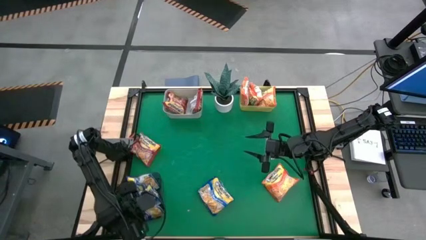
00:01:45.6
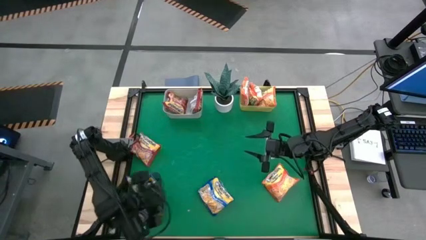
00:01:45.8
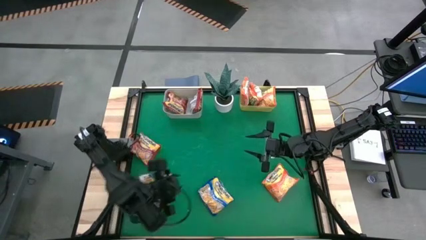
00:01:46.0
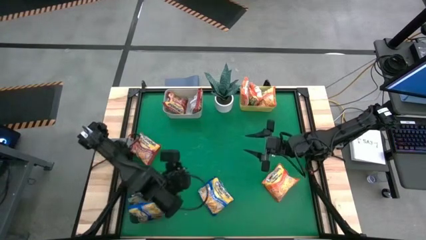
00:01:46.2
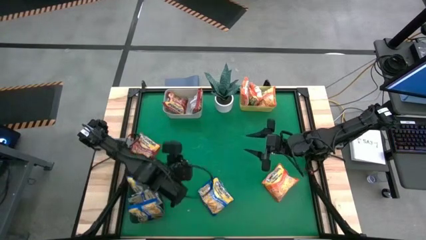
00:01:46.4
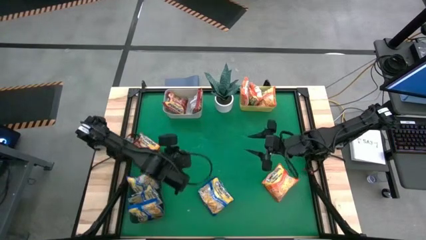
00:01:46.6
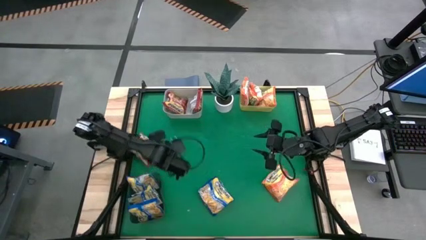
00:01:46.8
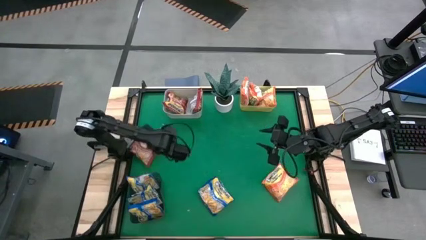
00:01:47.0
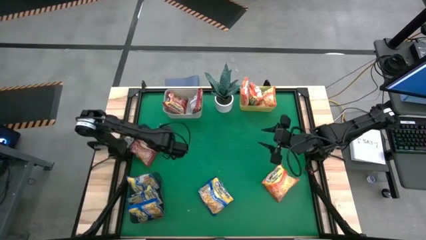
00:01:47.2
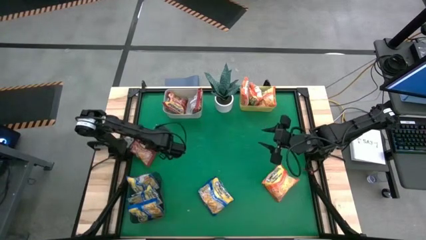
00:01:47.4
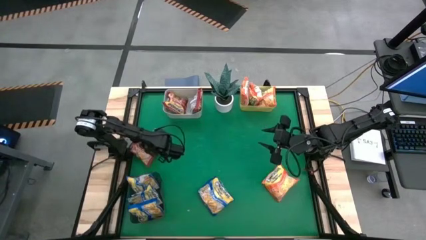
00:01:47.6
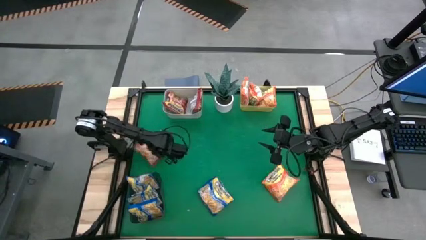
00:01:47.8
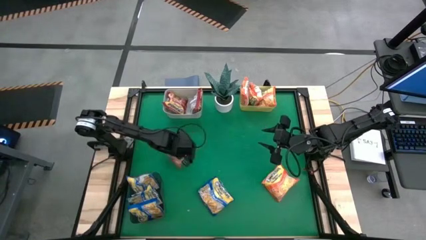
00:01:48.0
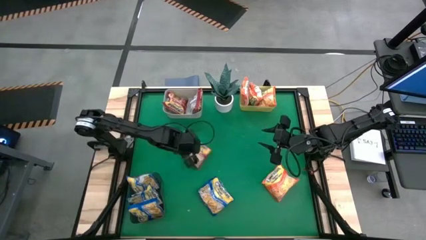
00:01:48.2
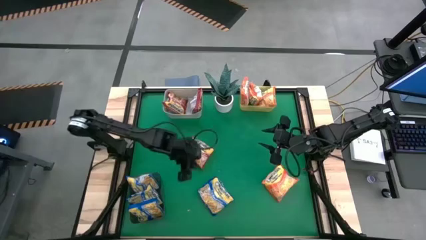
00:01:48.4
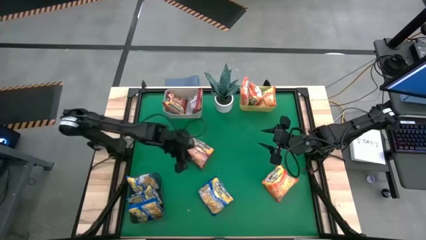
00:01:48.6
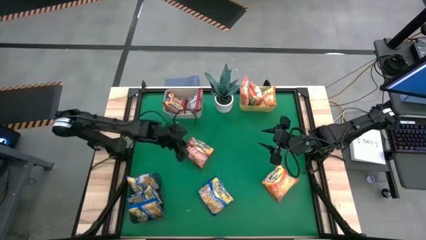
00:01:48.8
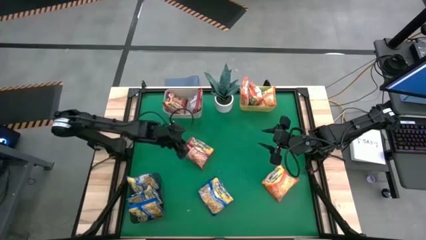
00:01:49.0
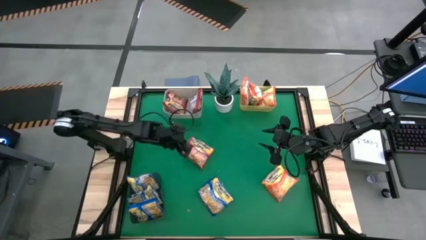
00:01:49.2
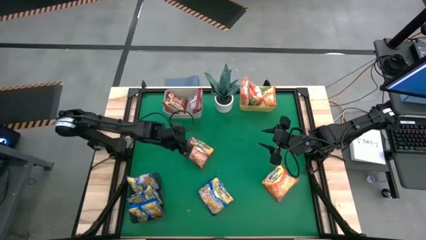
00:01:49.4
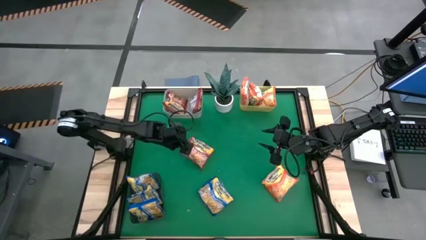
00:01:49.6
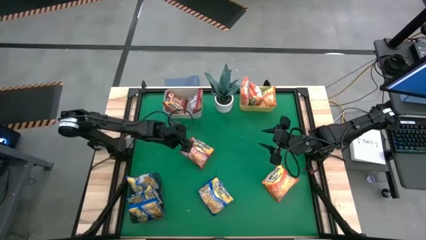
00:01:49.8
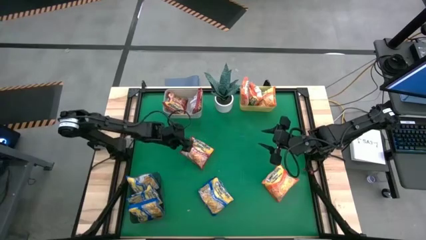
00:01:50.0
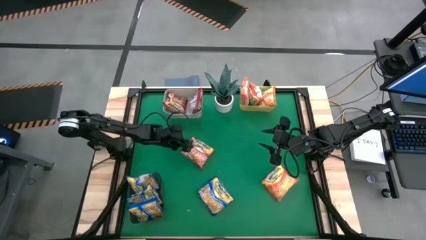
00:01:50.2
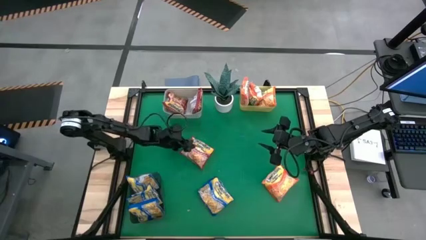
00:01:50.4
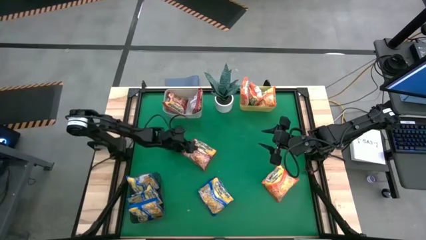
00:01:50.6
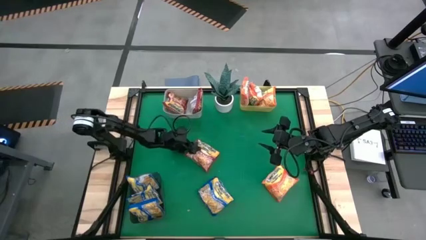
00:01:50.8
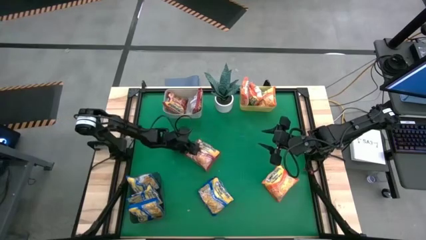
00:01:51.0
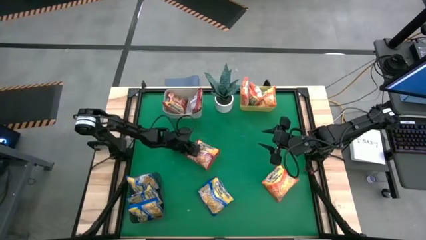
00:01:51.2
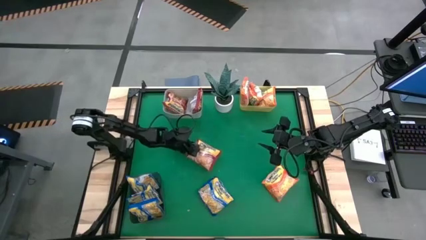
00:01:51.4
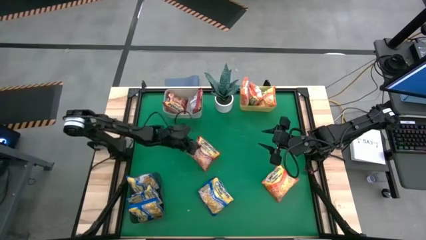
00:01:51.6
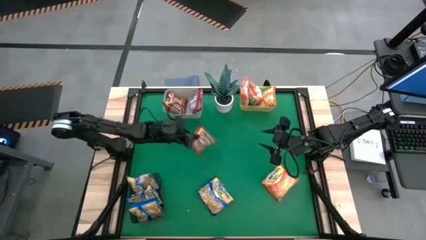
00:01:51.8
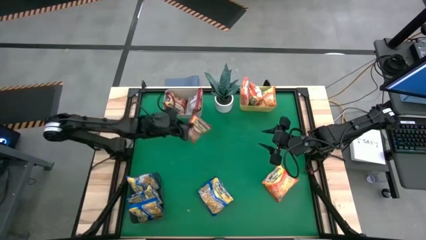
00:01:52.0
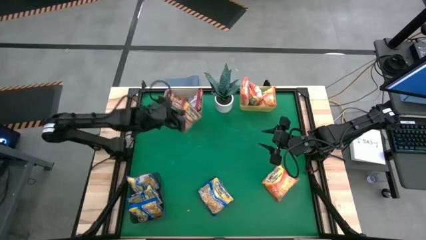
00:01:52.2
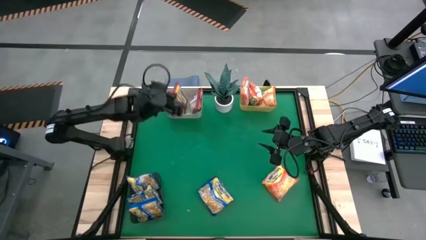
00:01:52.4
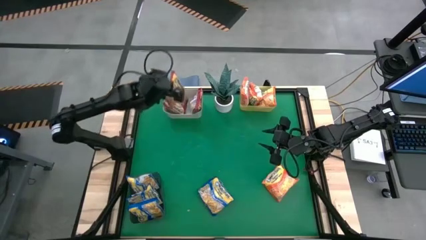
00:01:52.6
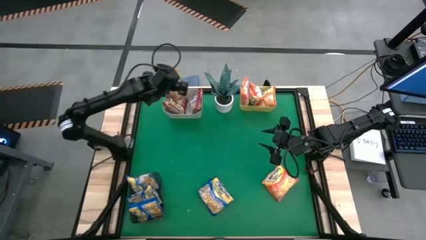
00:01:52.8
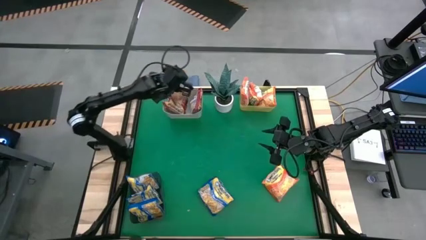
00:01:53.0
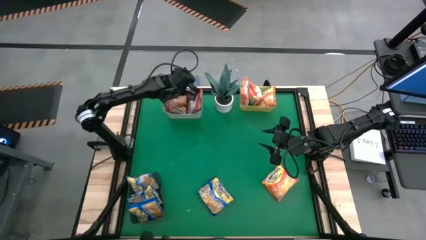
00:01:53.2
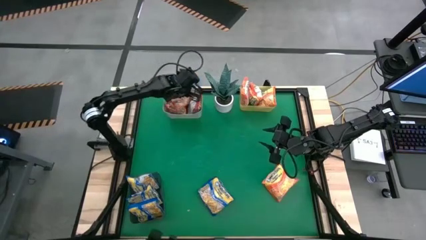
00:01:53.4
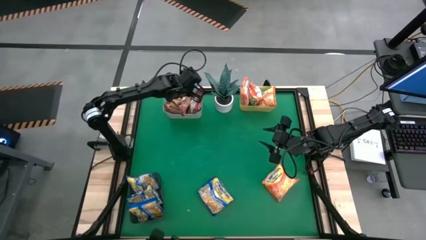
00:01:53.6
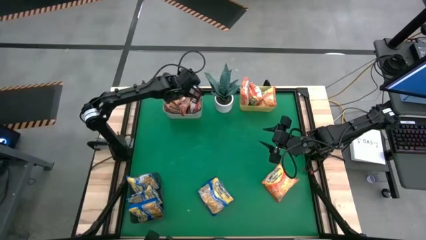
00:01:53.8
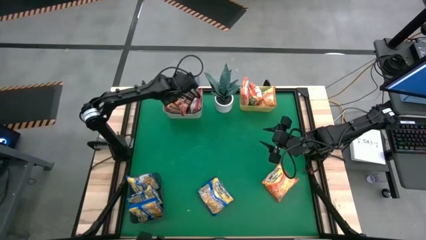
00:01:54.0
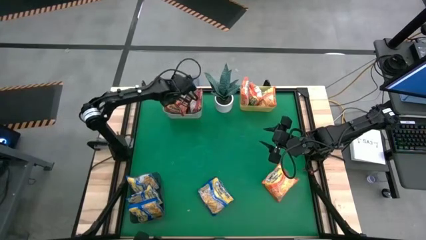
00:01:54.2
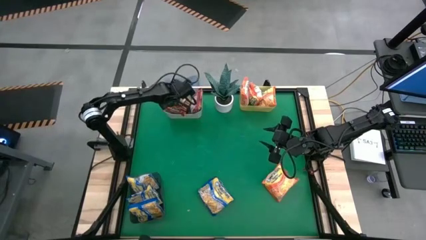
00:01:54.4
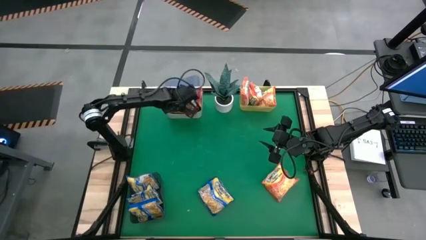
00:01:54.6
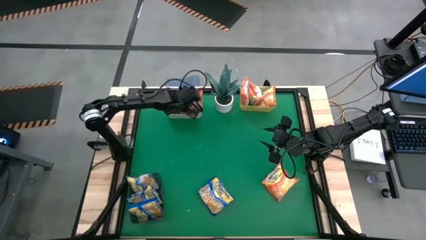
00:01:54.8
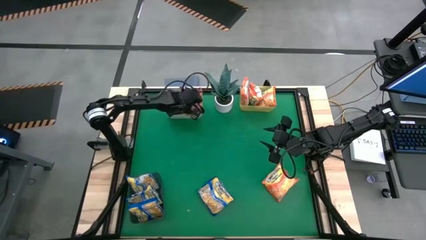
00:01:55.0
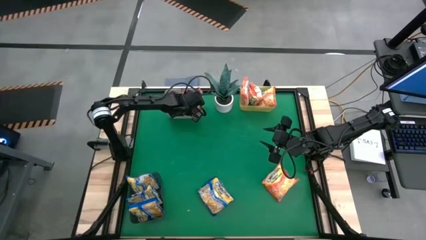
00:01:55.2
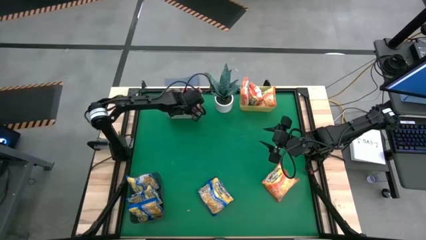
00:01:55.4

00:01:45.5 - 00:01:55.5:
Task: Sort Maruchan noodles
Put the red noodle pack into the white bin

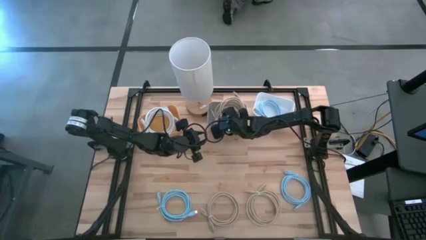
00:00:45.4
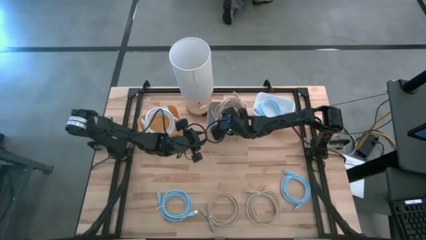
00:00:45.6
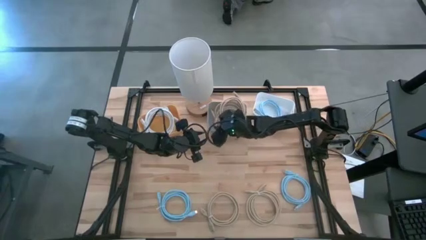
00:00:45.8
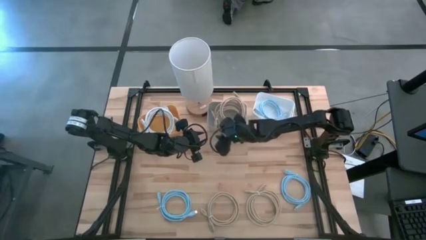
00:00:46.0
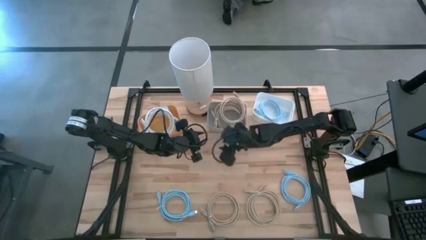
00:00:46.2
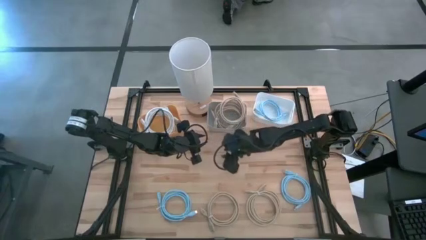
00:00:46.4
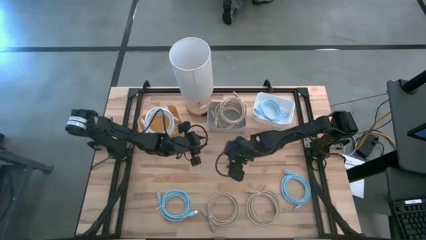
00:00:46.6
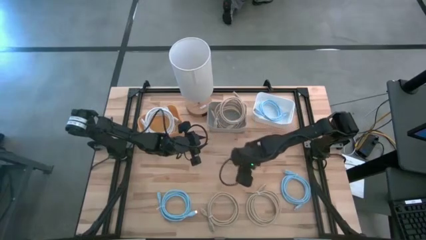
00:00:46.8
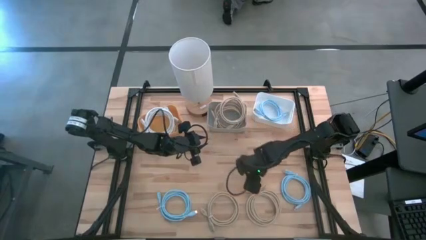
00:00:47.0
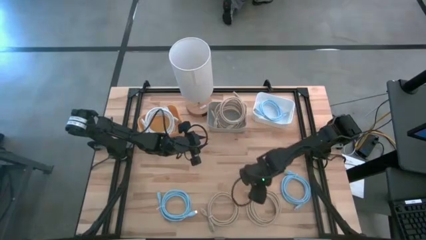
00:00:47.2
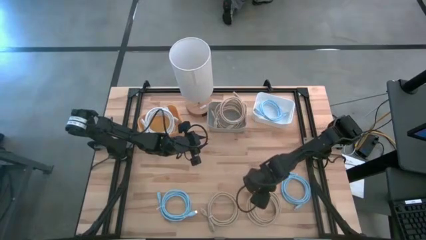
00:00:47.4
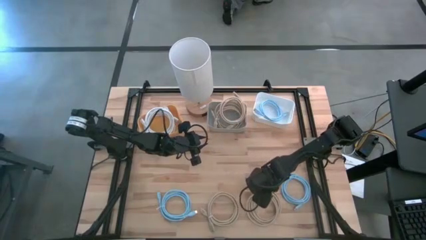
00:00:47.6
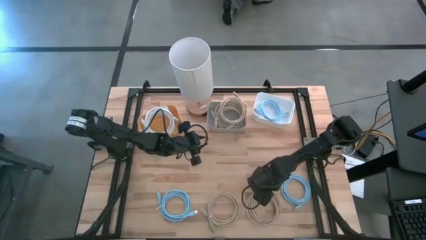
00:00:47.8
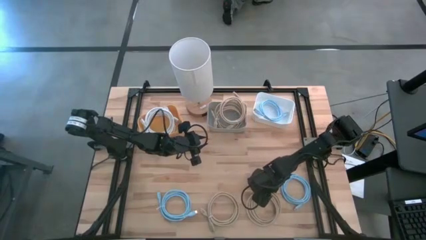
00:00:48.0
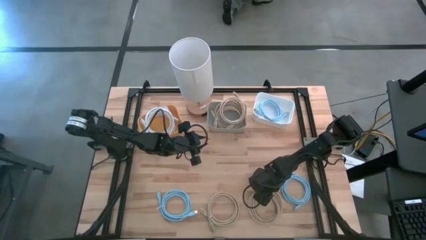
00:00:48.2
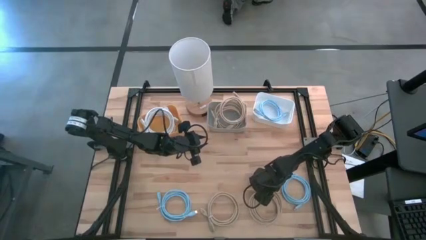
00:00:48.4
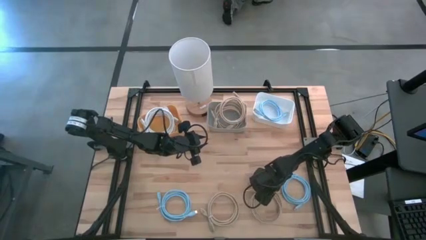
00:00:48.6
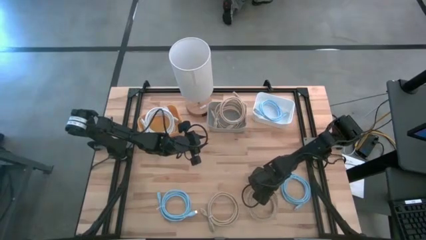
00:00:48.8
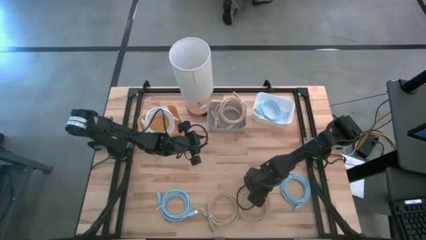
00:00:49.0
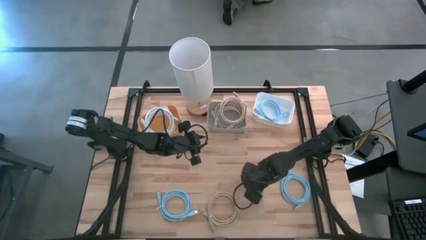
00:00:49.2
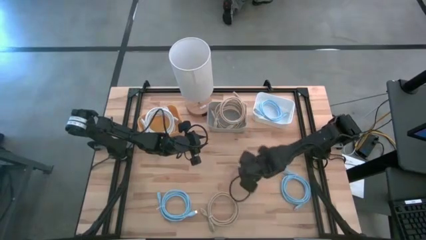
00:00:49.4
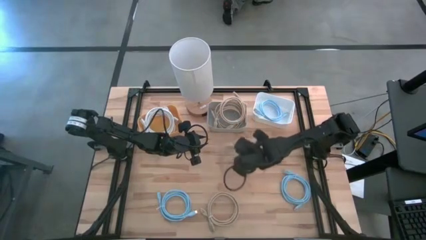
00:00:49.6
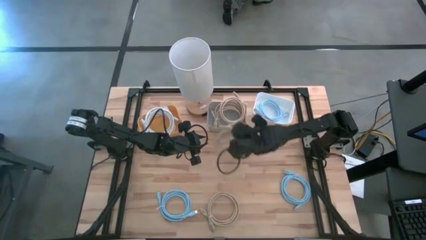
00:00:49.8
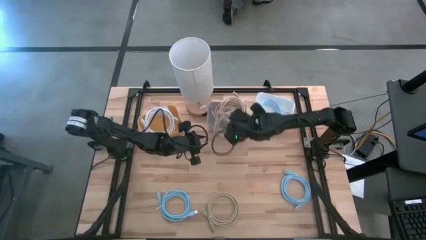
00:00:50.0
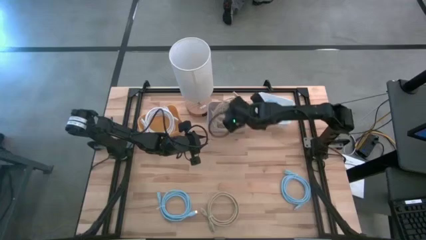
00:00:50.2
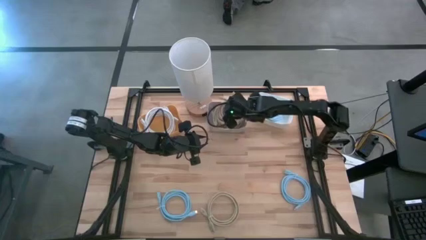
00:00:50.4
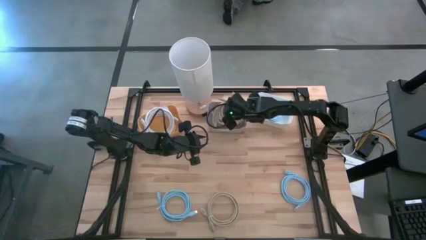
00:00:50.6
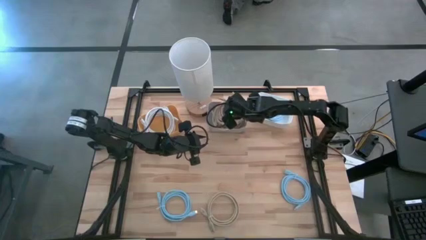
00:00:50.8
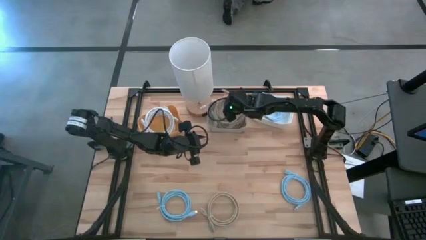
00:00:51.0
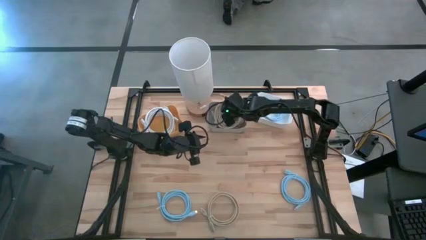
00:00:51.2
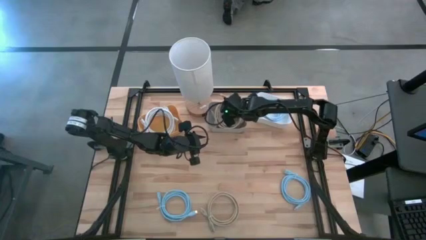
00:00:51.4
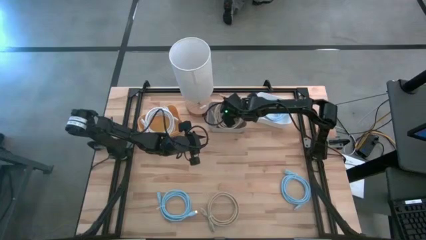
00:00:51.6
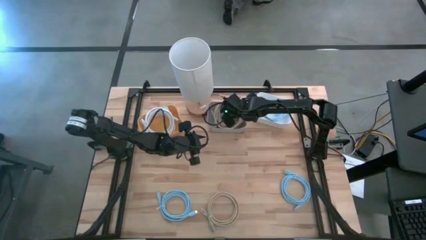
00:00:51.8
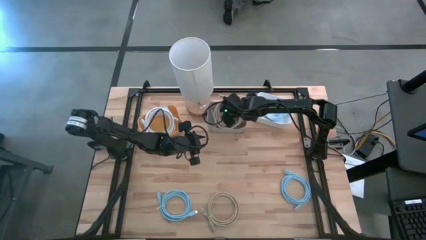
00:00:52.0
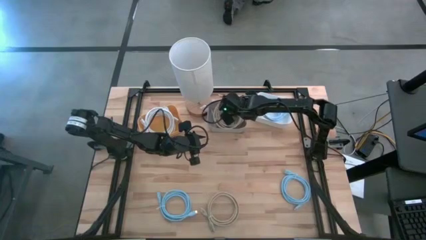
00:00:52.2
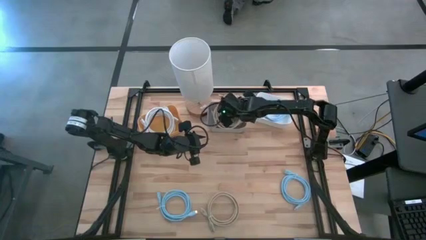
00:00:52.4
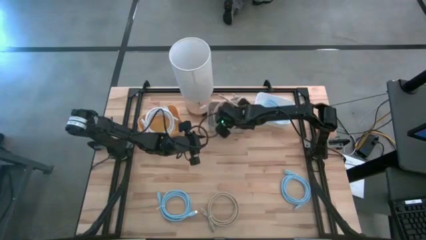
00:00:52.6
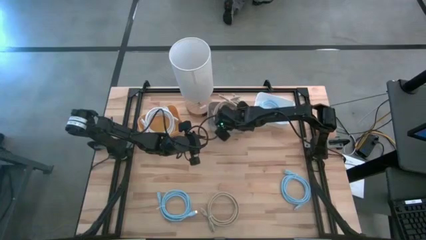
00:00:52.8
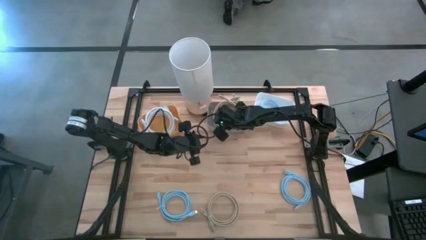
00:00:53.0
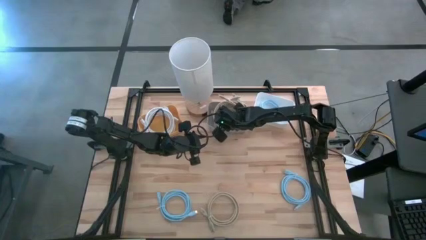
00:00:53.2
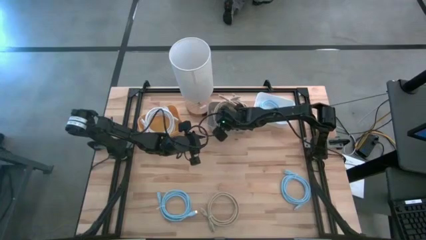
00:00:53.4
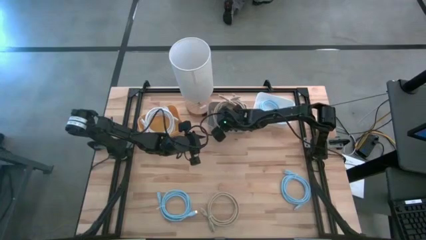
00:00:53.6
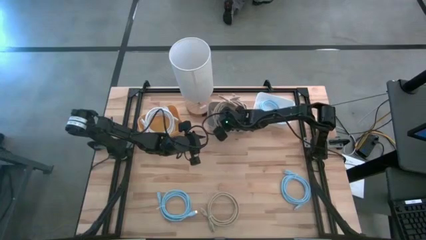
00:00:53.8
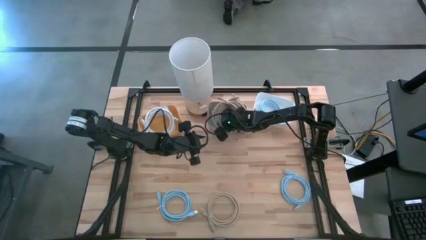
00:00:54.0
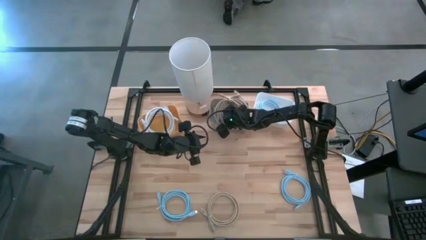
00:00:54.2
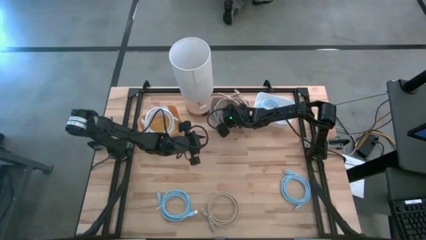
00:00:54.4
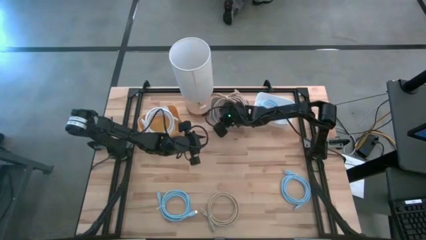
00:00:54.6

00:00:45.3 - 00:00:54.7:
Task: Sort HDMI cables
Put the brown HDMI cable into the gray bin
